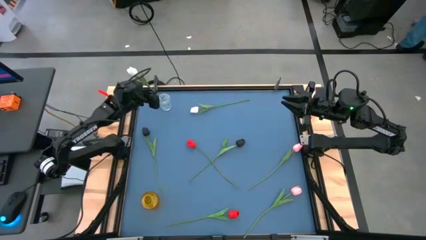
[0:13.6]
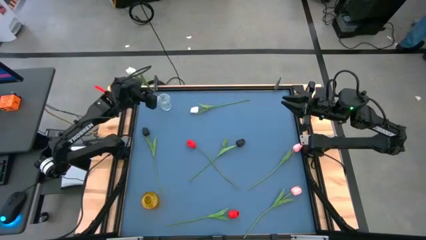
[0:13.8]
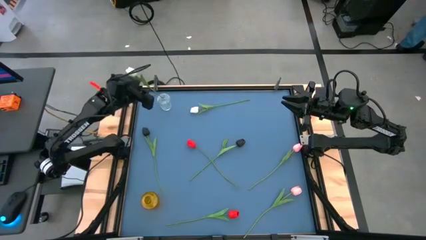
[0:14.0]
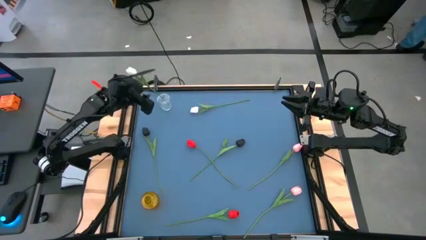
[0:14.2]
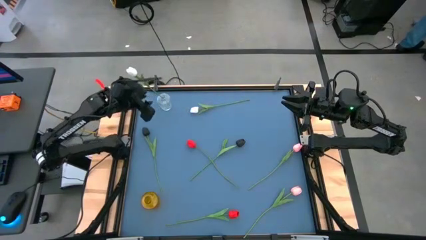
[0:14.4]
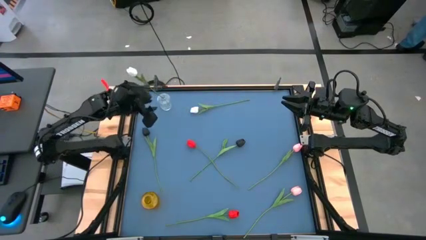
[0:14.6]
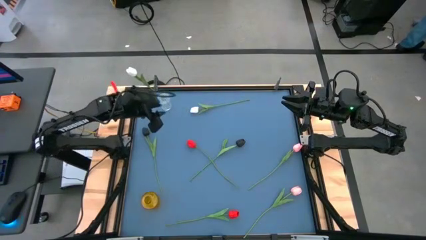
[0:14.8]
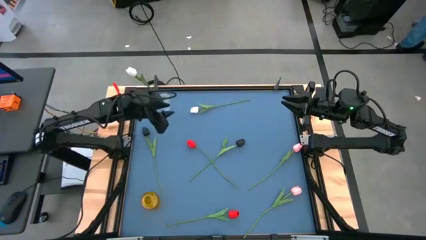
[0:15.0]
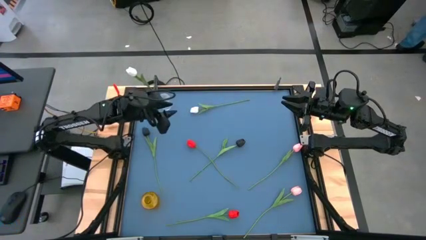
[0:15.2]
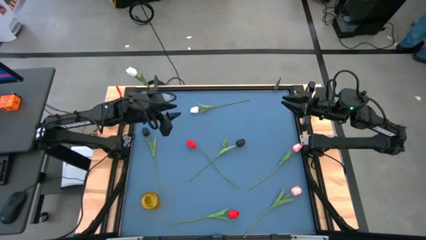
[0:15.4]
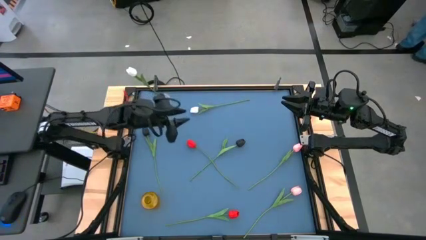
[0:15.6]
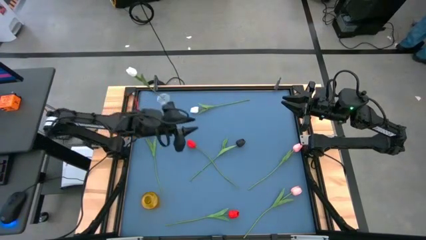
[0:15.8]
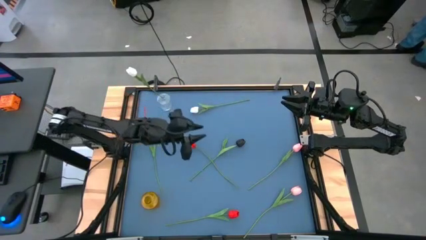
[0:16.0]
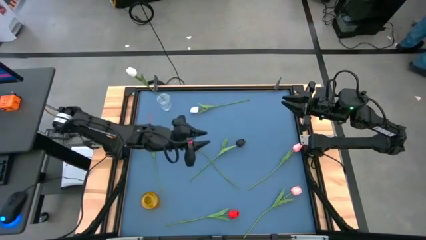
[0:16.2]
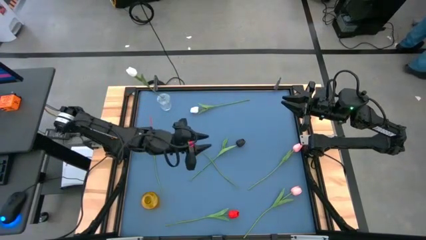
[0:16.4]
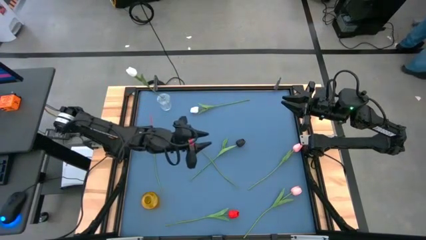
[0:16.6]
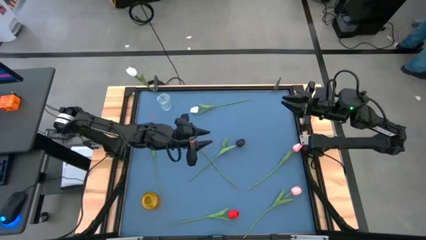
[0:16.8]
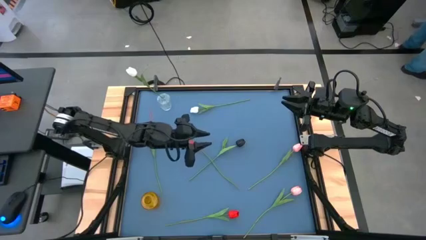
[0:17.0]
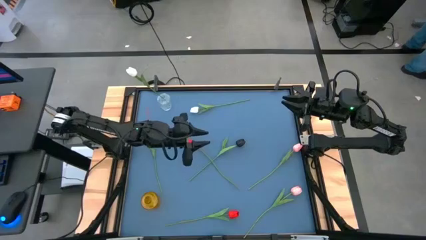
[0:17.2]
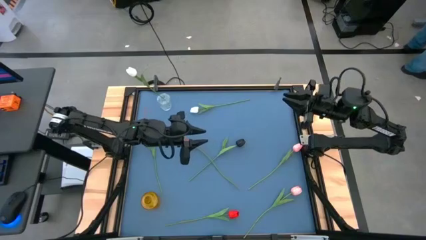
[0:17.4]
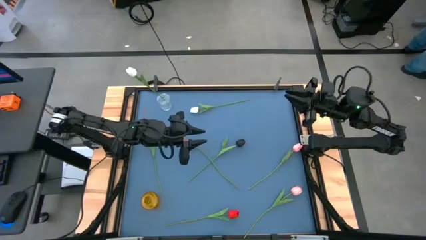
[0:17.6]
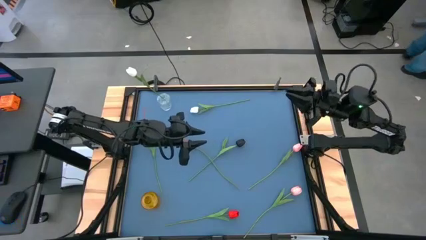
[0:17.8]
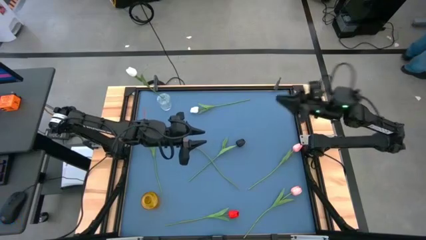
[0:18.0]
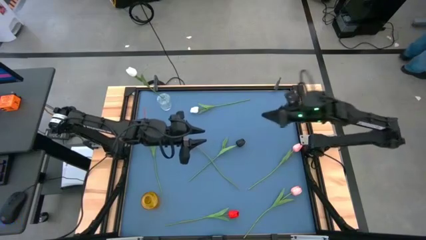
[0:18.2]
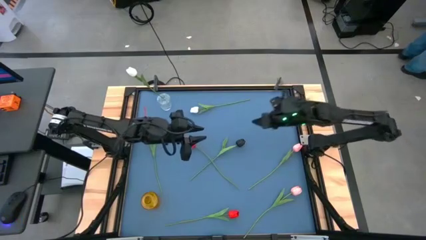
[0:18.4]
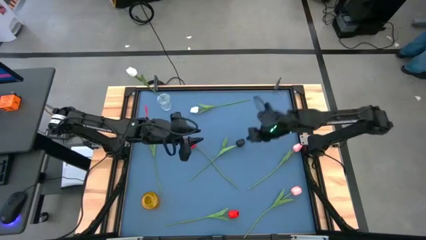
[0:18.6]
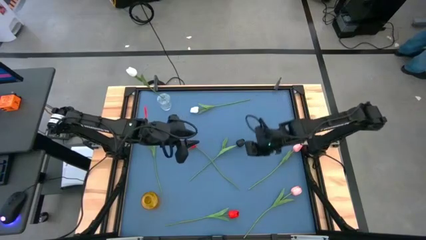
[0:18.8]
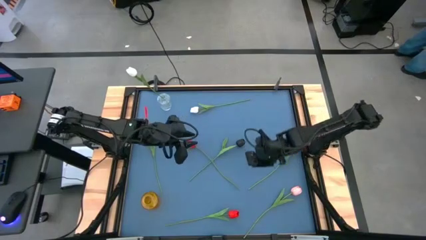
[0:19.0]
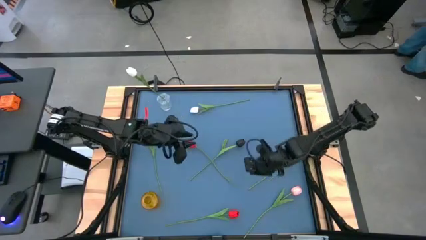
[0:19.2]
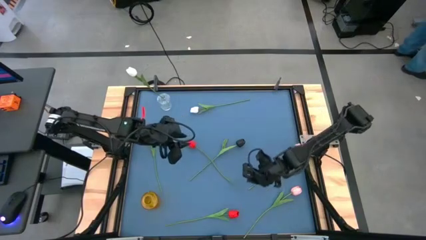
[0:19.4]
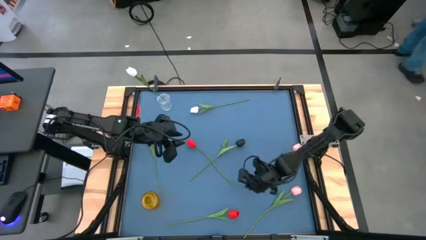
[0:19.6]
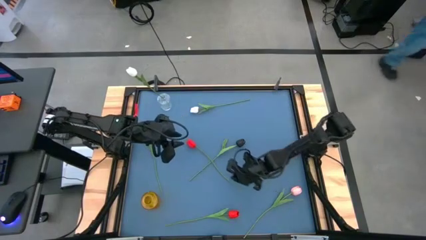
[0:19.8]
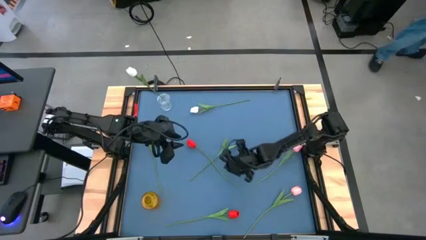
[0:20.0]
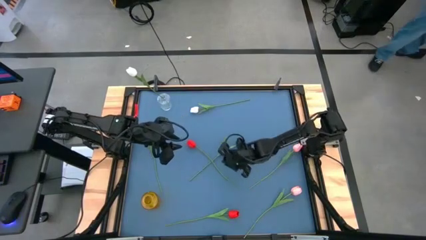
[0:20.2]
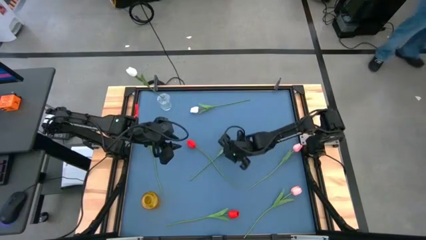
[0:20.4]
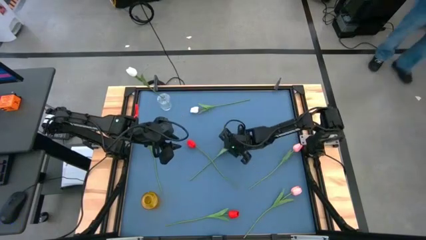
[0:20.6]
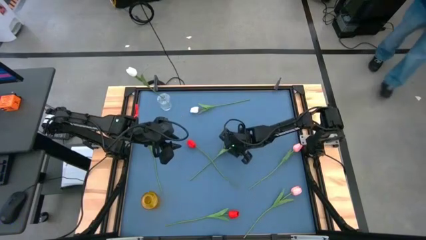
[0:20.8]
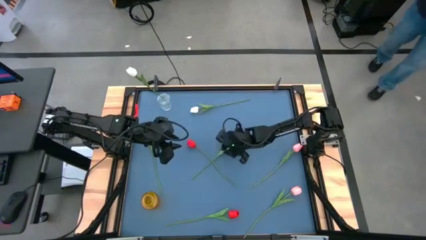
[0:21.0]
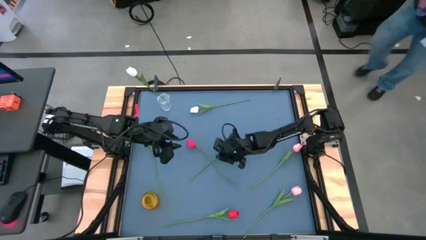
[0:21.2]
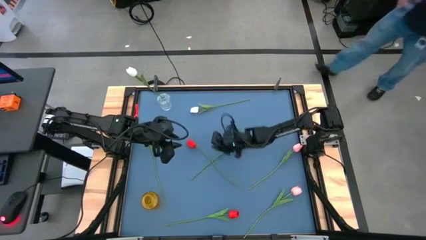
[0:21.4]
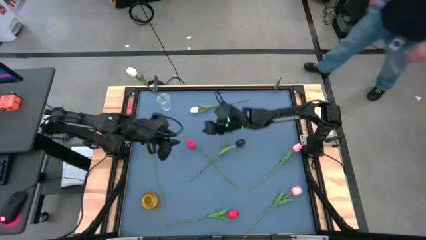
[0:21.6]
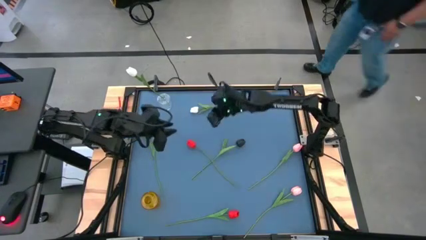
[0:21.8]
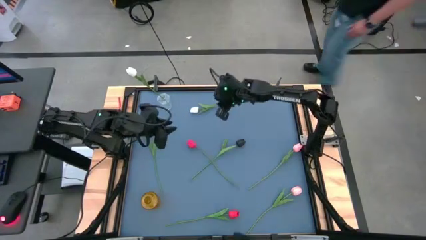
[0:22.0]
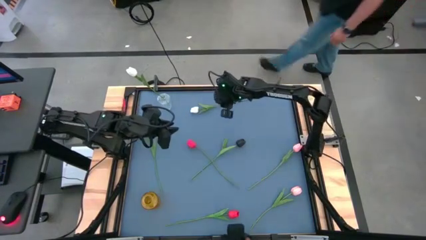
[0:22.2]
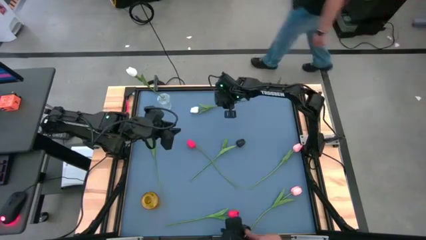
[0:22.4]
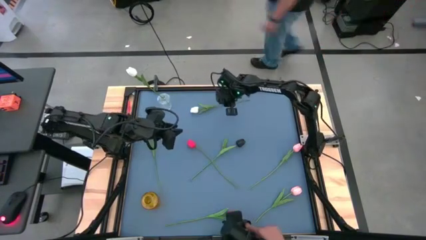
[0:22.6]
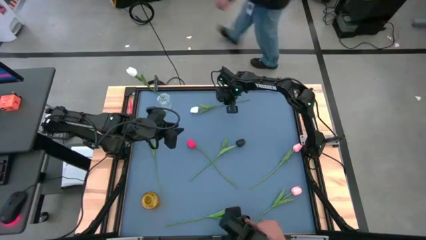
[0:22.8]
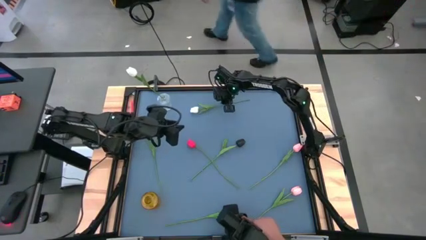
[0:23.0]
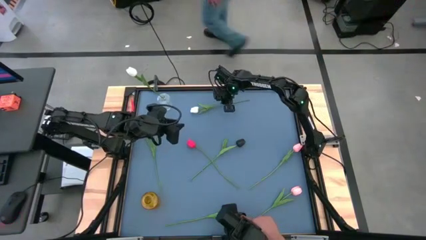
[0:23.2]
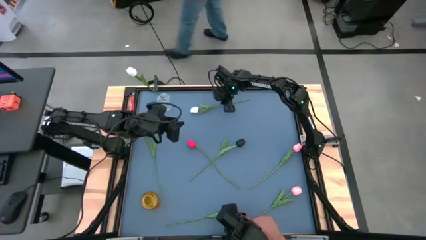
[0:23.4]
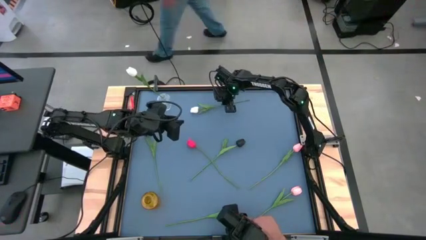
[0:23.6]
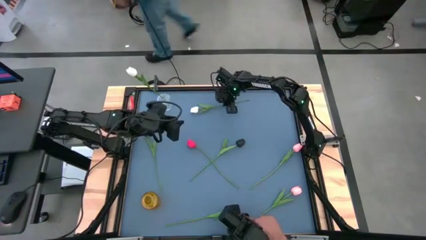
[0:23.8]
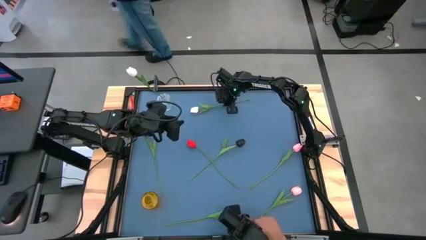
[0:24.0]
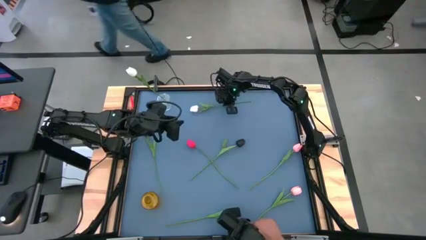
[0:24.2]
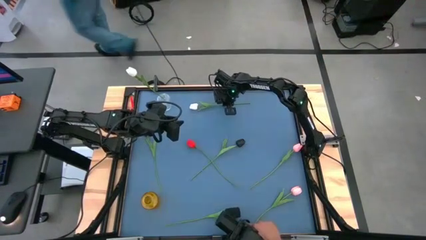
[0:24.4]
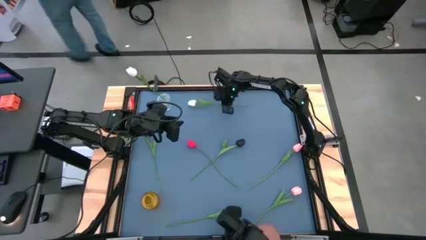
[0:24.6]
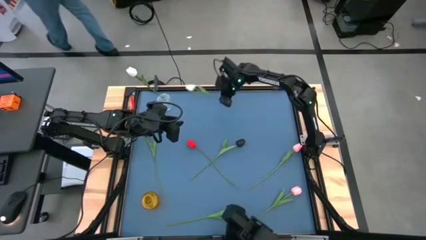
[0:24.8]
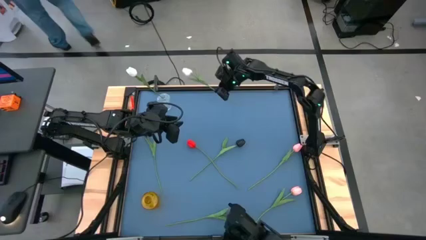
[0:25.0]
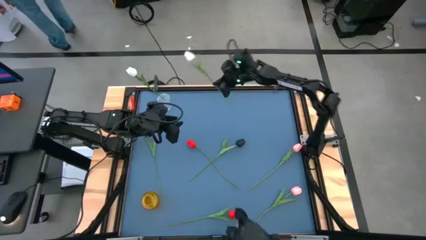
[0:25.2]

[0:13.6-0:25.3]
Task: Sort flowers into vase by color
Put the white tulip into the transparent vase

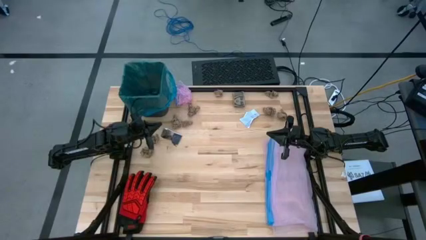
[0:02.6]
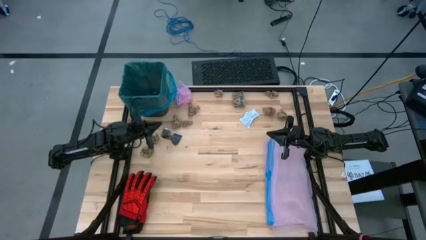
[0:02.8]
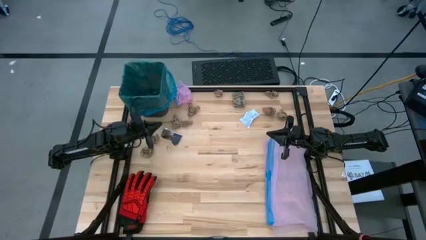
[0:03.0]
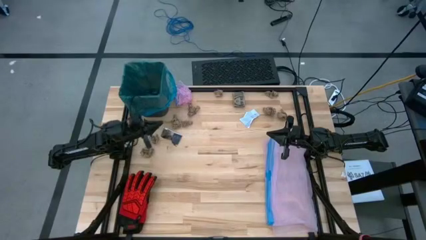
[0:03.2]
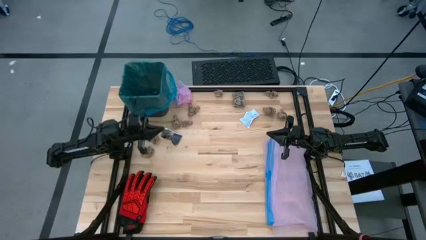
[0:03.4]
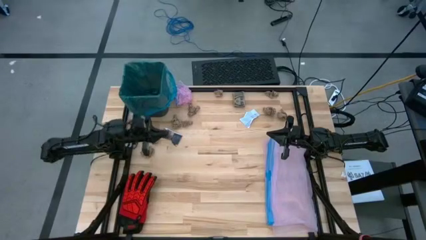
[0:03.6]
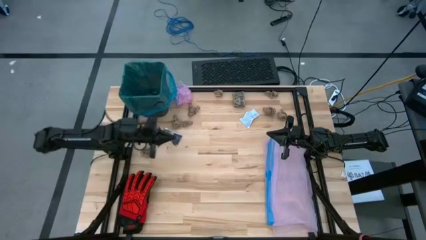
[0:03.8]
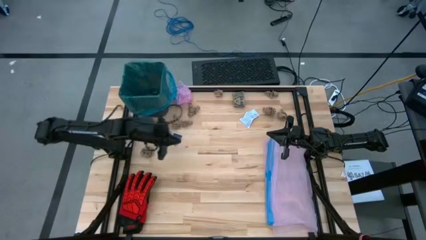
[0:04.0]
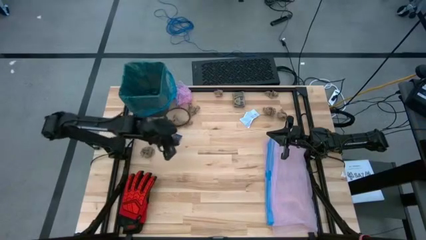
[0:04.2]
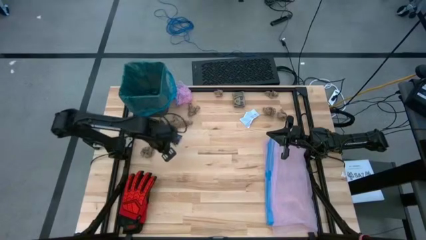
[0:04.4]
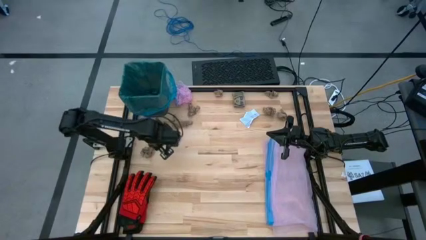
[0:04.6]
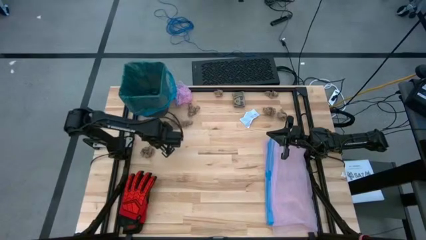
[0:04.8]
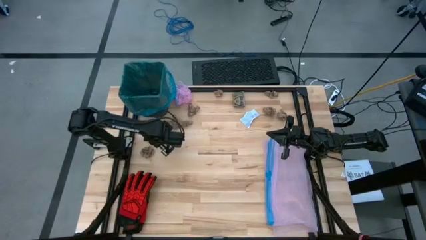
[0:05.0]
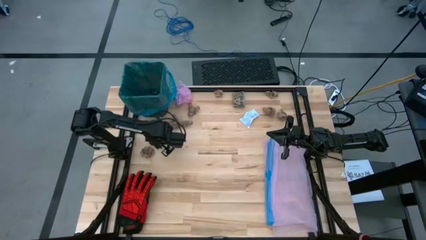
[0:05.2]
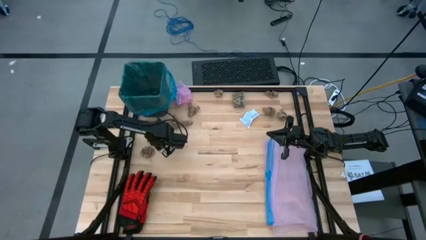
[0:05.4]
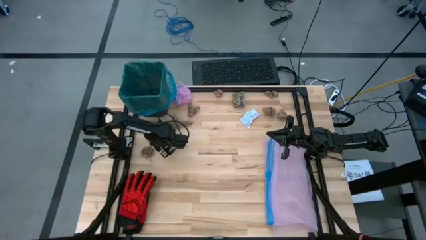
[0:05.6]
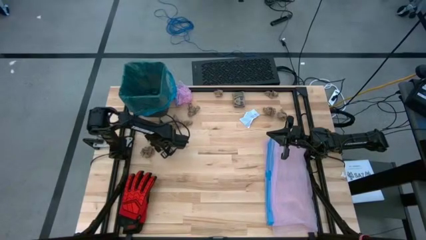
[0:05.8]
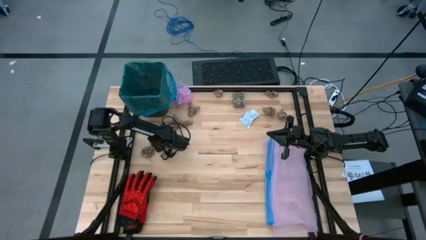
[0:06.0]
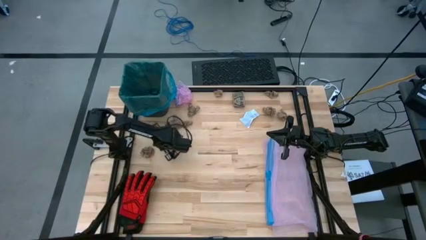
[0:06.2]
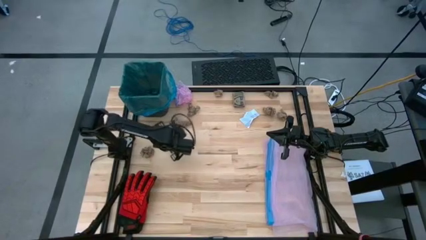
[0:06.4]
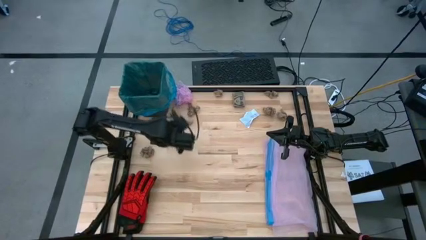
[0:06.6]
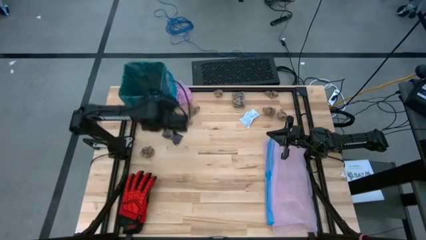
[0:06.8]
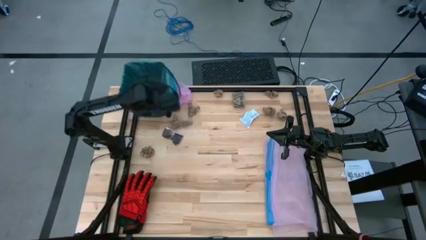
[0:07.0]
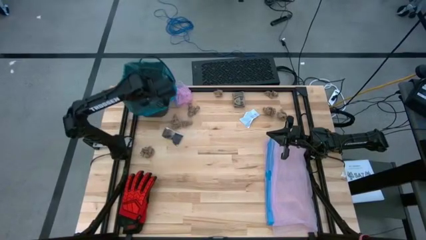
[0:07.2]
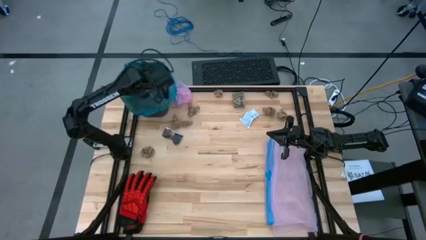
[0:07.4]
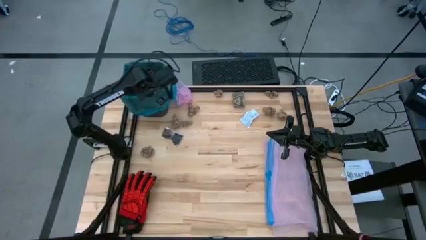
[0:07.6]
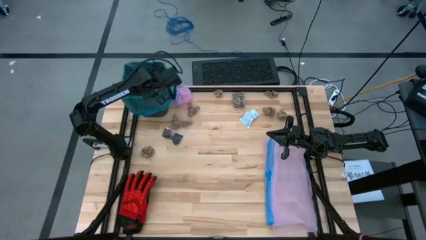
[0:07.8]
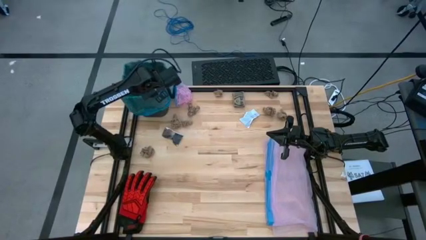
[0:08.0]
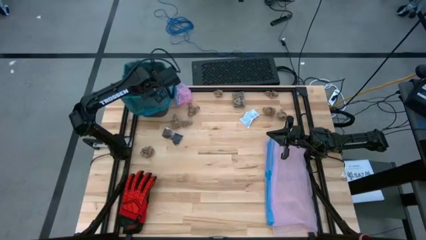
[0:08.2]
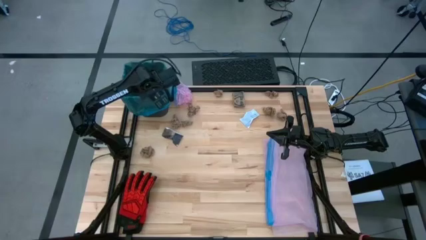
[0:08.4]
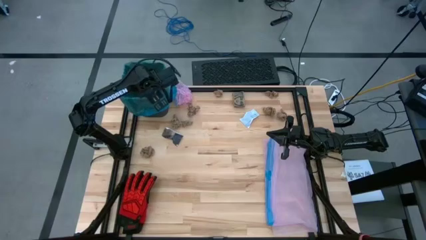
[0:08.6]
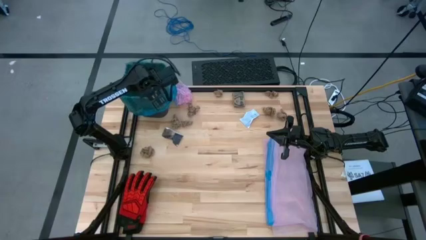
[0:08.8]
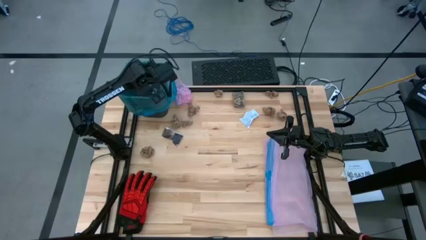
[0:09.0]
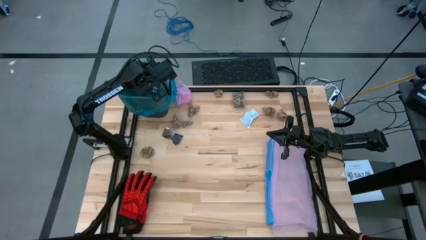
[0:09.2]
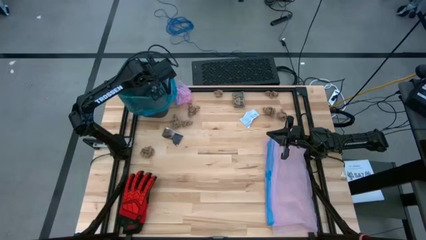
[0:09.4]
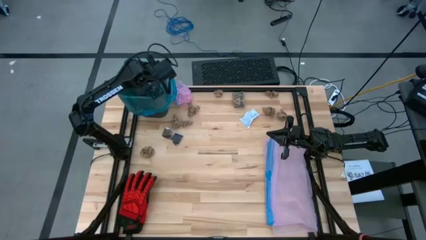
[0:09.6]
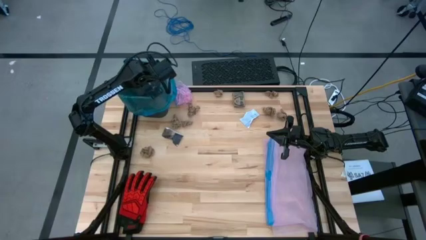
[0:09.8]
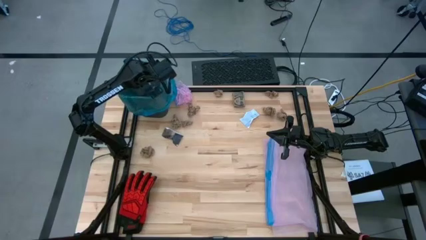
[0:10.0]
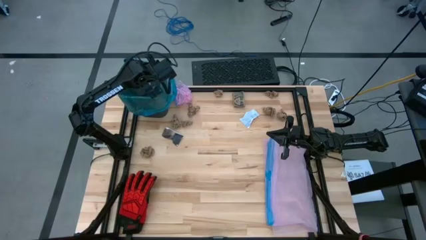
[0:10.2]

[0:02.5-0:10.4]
Task: place trash/remove bag and relplace
Put the brown napkin in the trash bin
